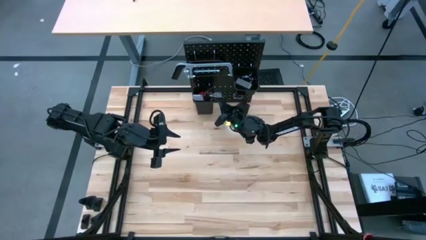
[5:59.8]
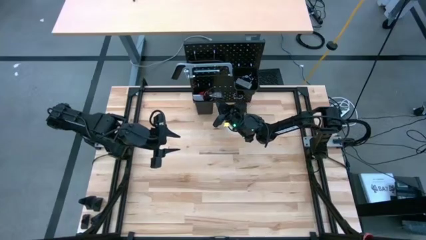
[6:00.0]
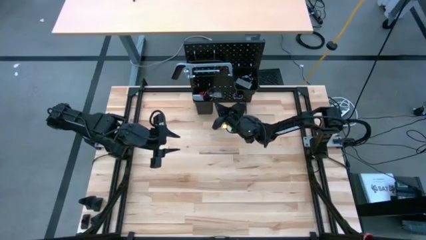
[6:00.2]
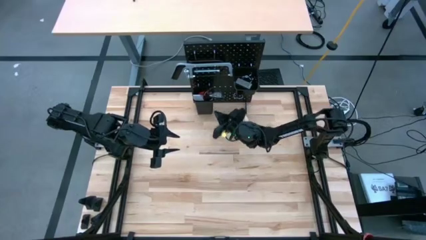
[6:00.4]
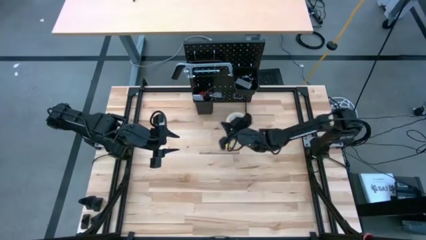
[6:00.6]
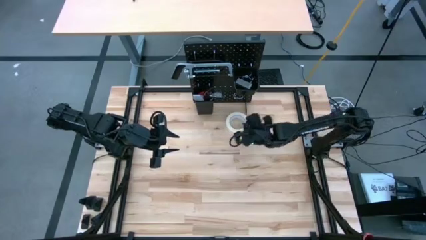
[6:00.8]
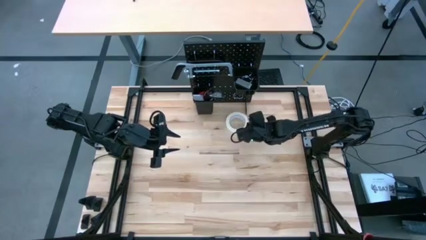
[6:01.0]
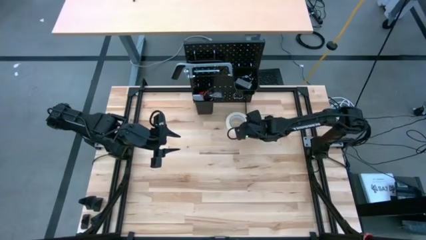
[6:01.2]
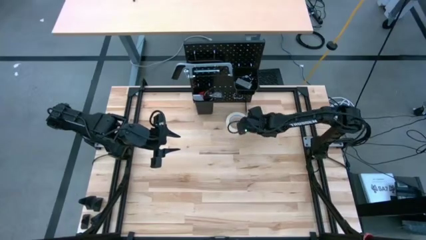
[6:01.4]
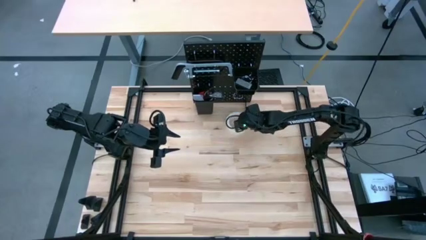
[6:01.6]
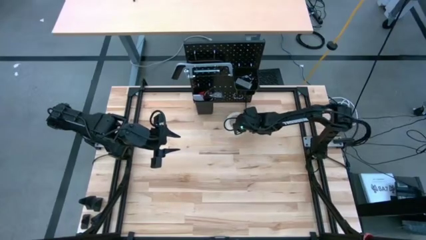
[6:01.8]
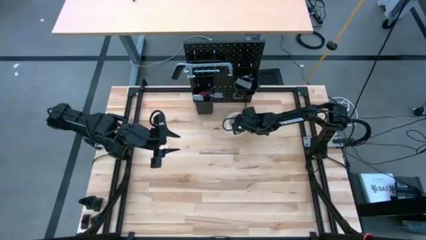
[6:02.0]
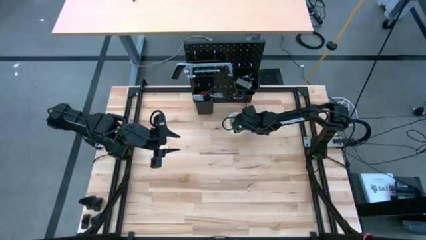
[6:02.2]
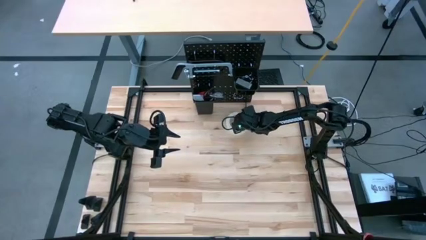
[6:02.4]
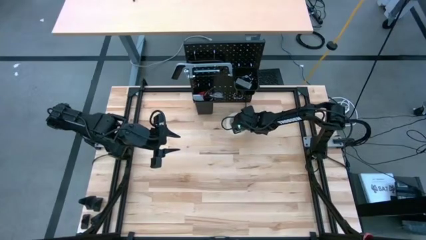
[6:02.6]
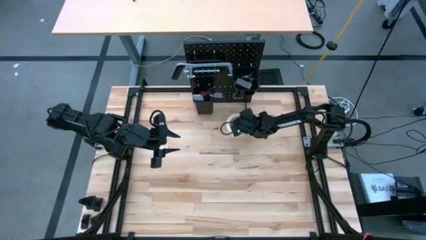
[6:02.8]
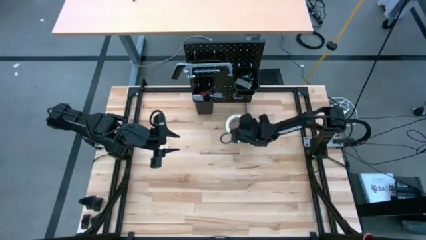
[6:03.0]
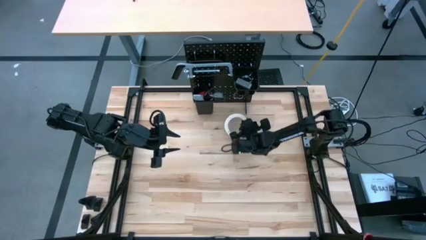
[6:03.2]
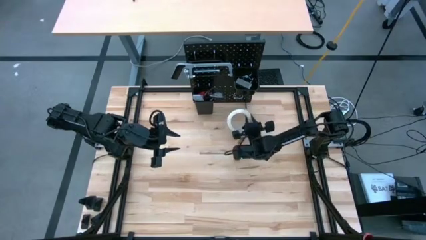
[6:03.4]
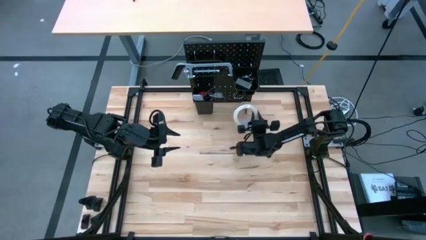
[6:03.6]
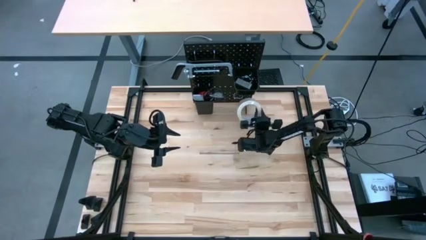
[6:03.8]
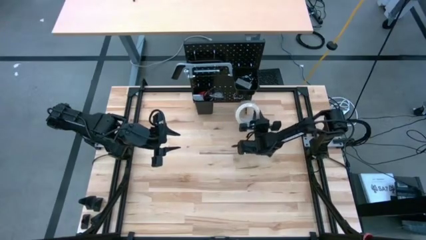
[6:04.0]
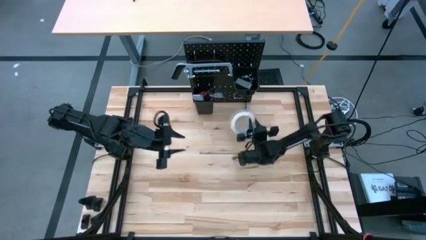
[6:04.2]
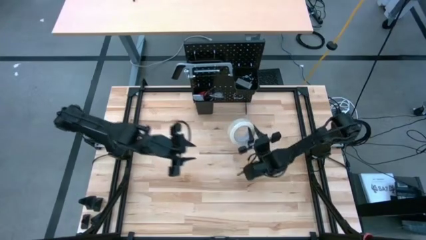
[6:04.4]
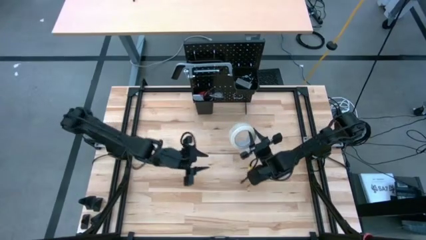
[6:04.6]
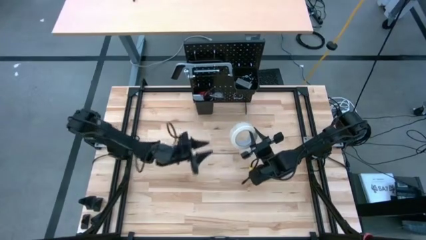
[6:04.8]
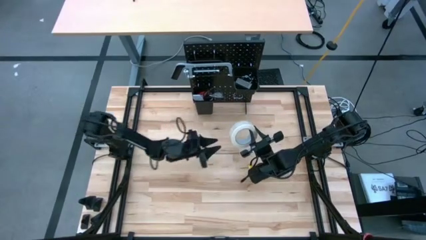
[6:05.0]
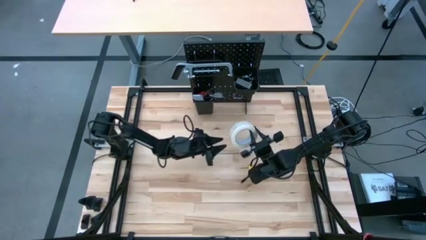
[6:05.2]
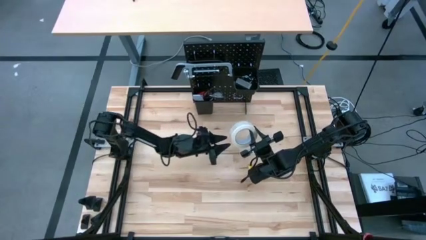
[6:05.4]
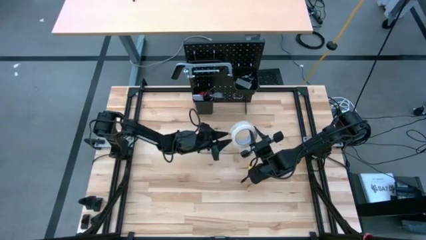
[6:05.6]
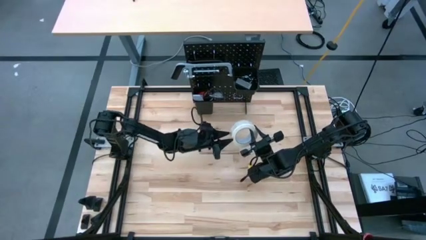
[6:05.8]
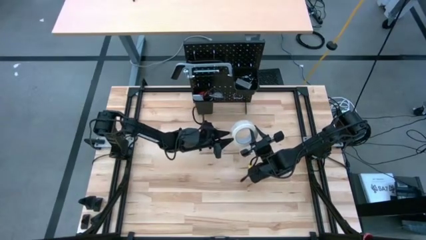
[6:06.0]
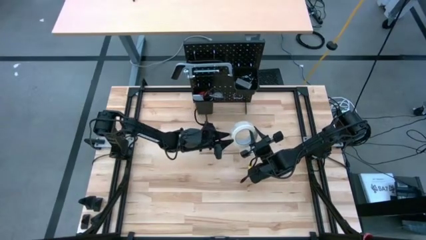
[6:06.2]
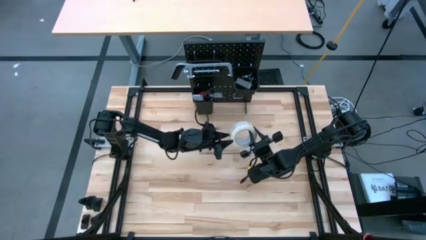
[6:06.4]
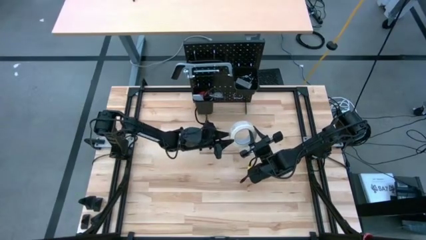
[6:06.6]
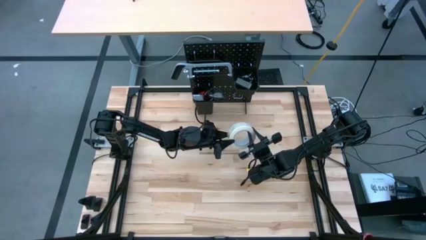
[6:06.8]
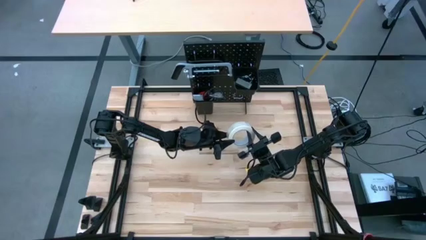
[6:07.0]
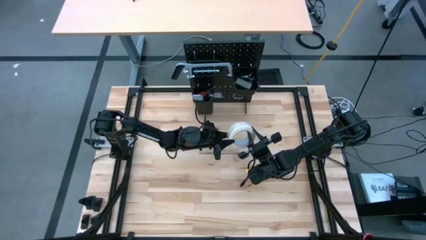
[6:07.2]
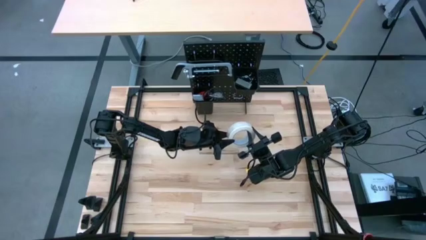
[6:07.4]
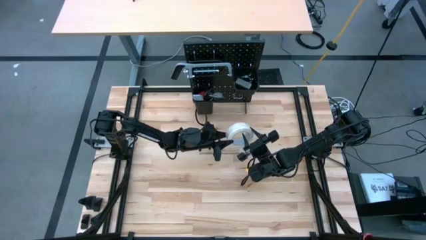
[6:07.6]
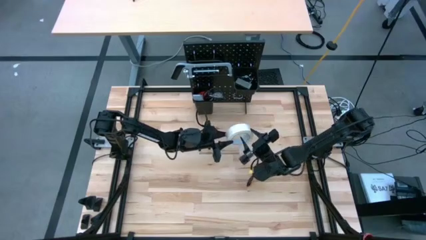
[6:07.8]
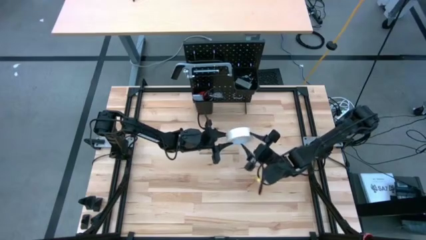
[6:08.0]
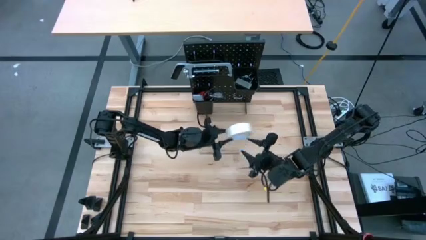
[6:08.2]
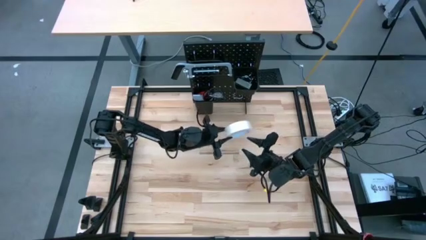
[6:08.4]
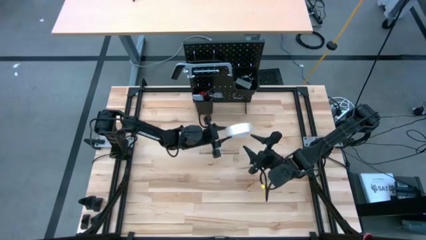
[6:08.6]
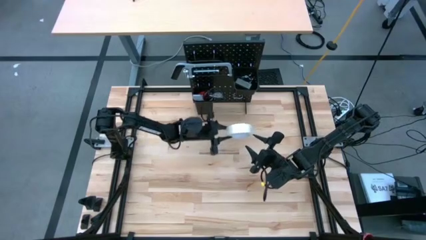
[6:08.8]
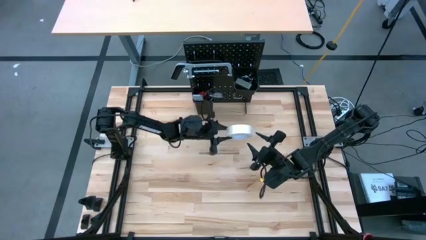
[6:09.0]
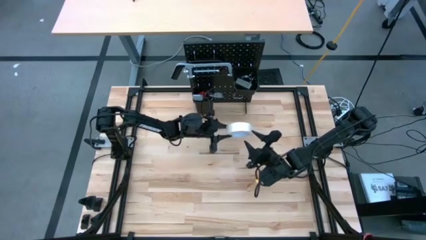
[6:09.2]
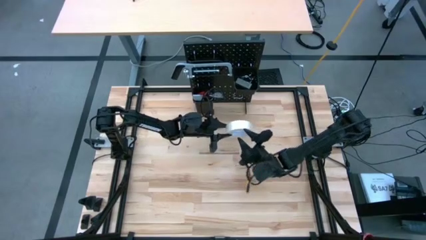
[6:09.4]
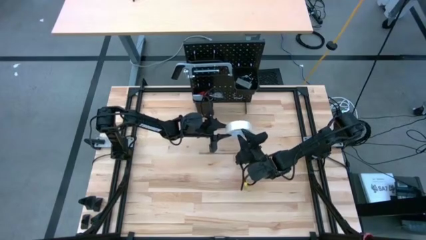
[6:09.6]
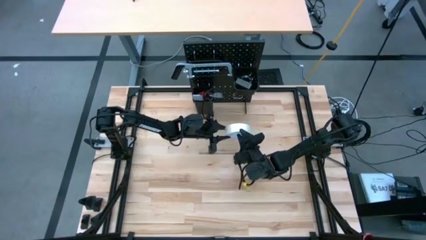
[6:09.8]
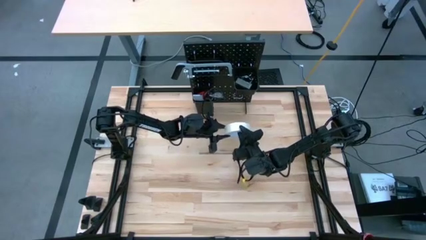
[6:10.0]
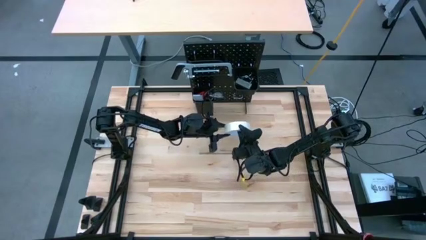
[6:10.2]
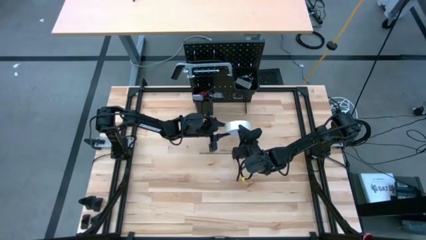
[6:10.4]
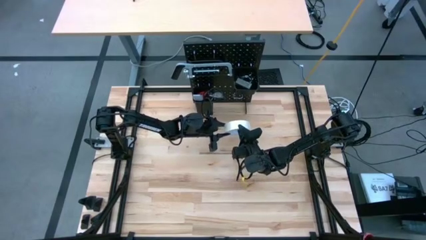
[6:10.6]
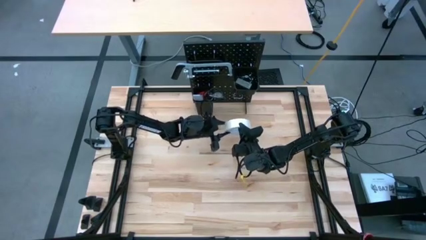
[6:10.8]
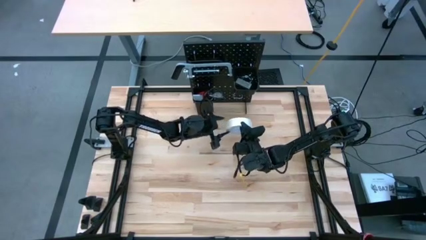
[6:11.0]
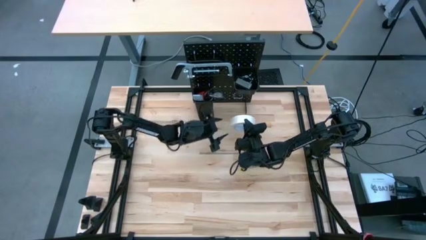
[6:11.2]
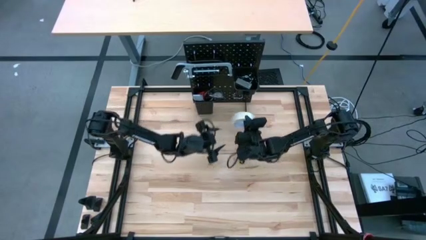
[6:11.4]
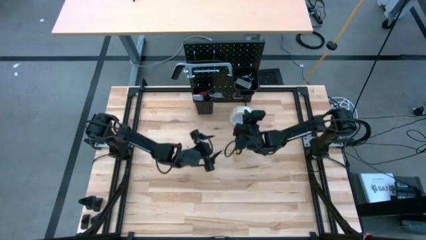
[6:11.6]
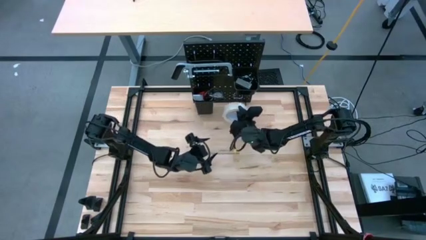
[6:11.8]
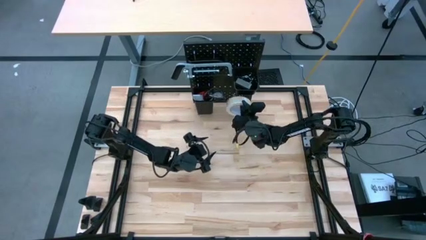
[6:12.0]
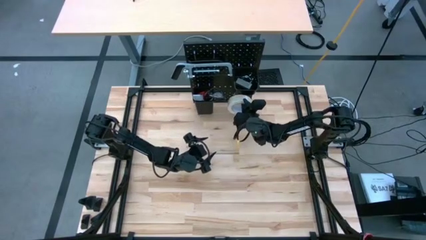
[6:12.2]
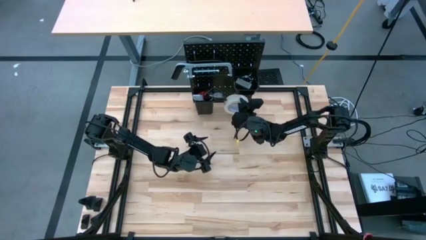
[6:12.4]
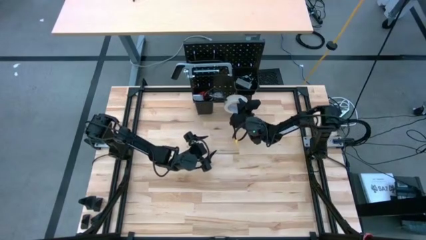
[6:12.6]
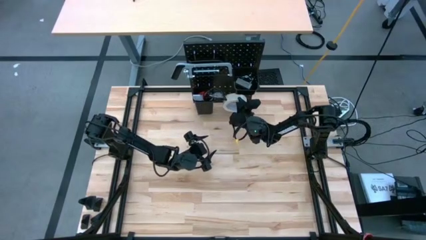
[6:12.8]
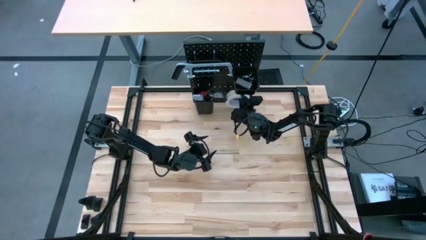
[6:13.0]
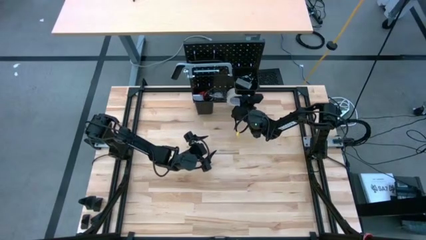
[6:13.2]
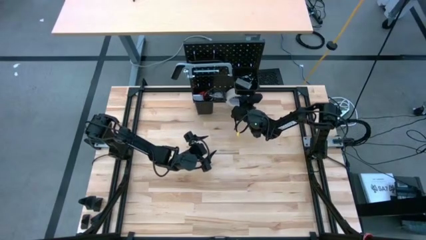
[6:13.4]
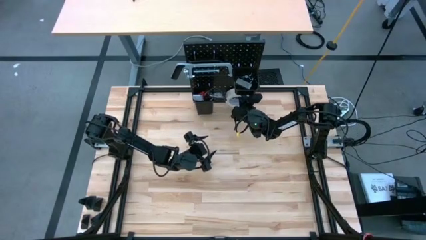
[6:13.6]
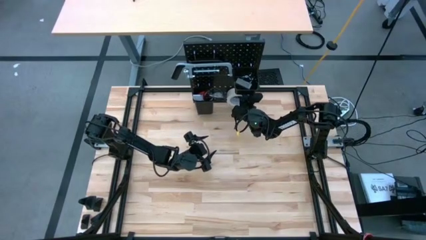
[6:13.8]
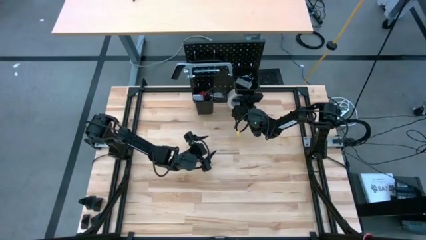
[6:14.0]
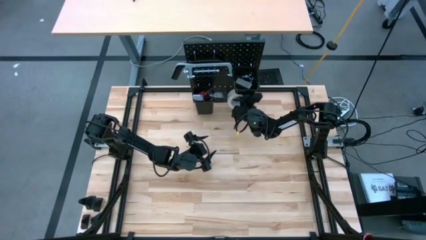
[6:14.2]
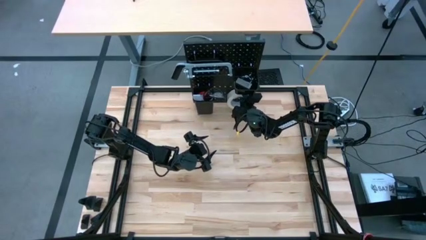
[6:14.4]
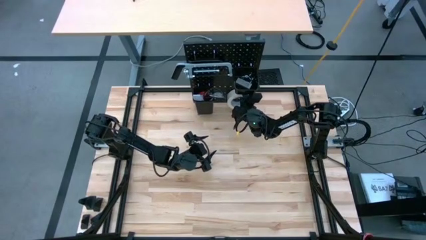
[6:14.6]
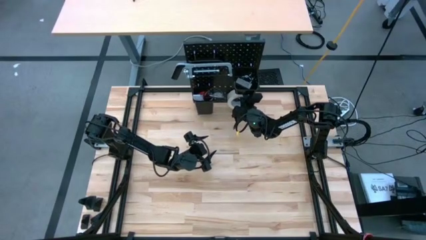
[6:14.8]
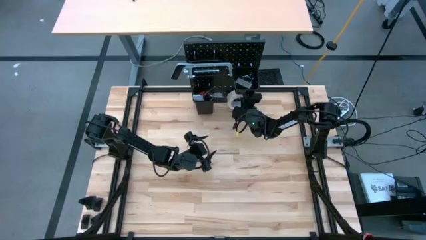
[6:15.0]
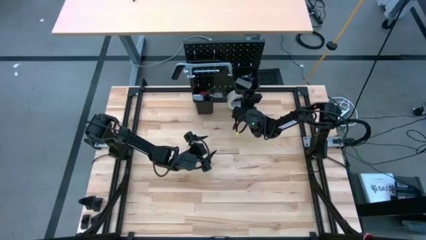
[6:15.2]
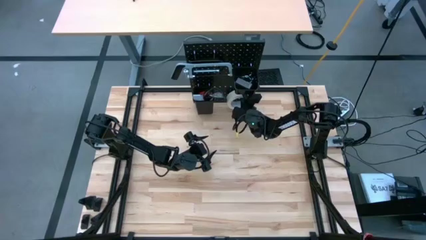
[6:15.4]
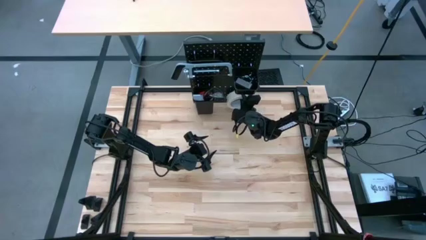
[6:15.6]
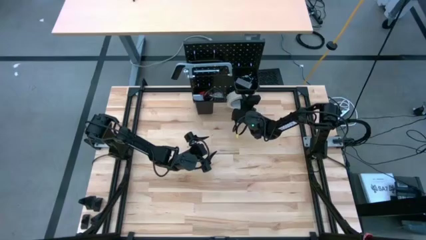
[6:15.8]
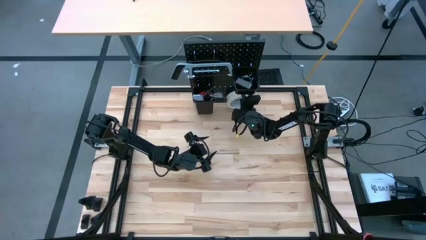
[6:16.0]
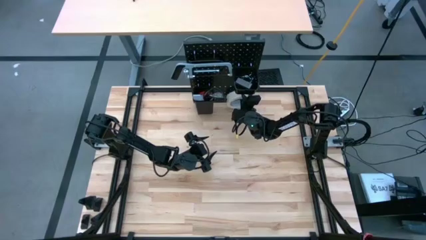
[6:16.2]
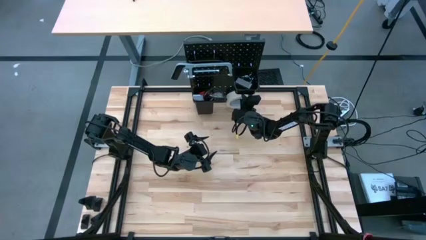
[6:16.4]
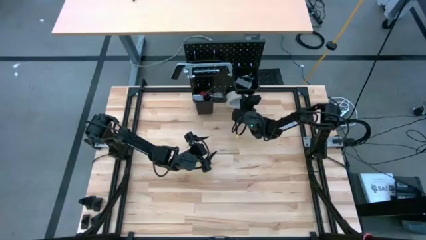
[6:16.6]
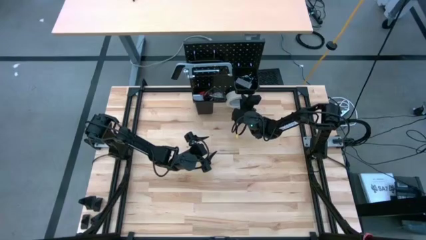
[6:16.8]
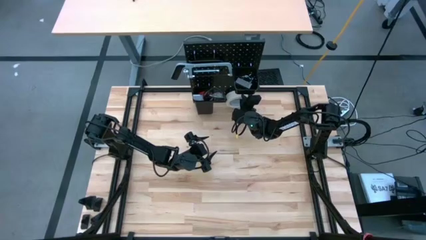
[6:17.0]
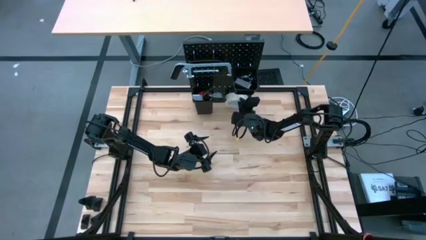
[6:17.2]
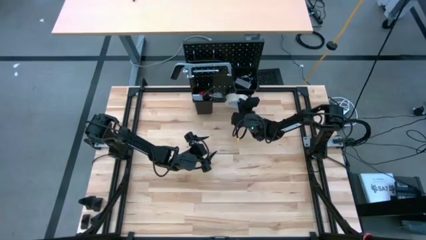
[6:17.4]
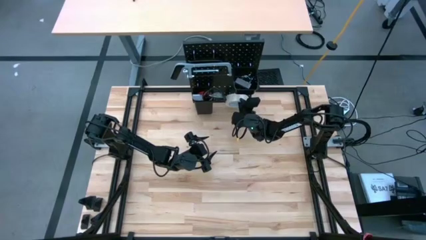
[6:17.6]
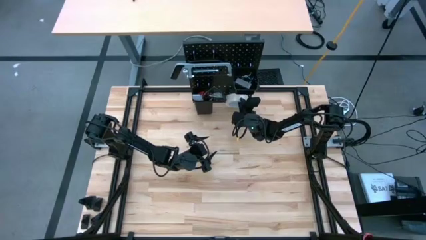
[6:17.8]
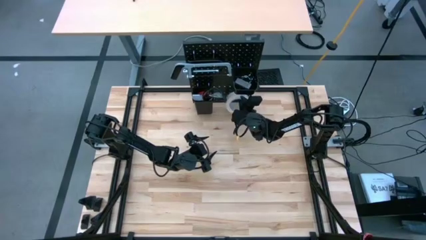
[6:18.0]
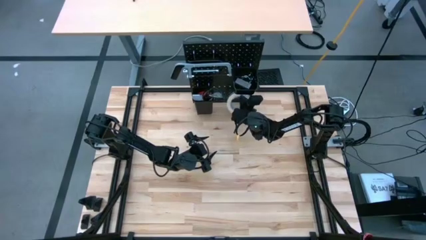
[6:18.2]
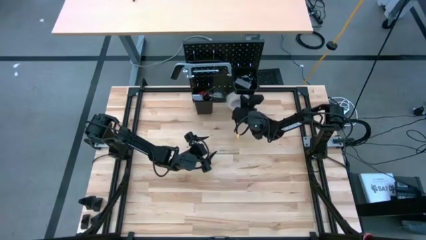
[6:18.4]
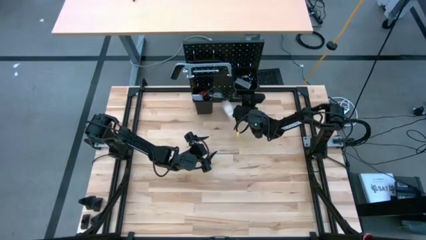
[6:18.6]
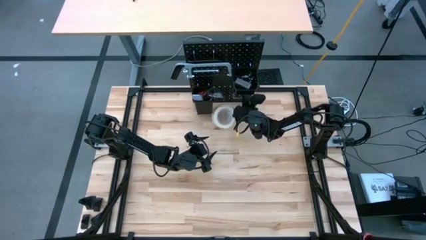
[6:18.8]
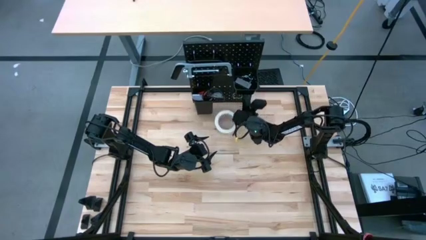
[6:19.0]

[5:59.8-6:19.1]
Task: Hang tools onto peg board
Hang the white tape on the black peg board
